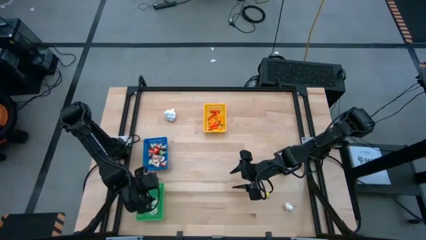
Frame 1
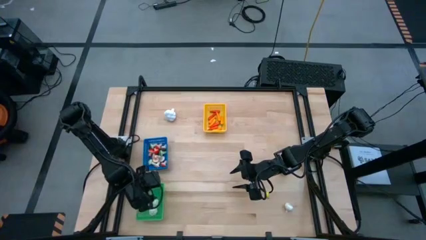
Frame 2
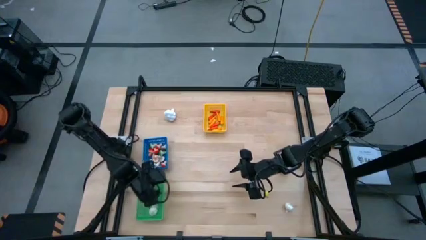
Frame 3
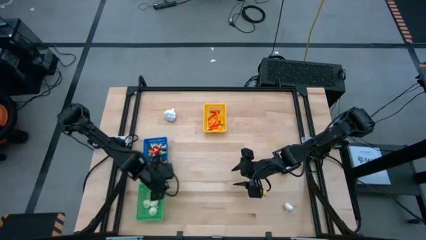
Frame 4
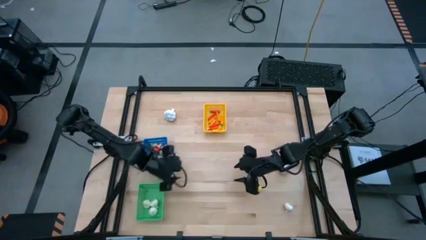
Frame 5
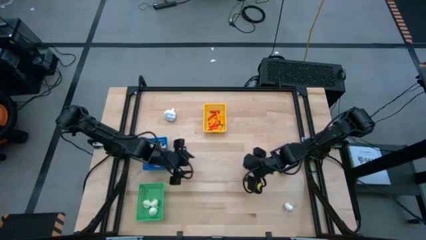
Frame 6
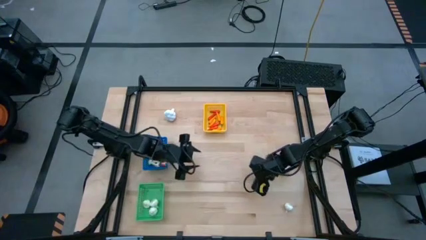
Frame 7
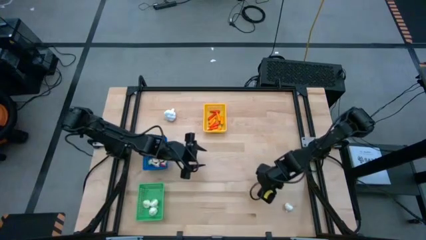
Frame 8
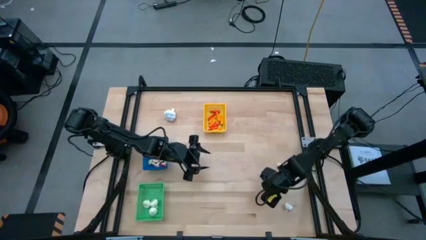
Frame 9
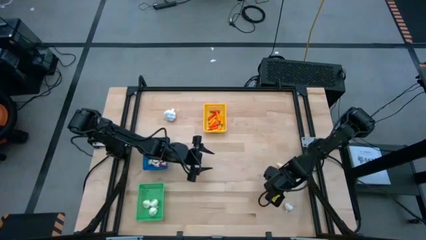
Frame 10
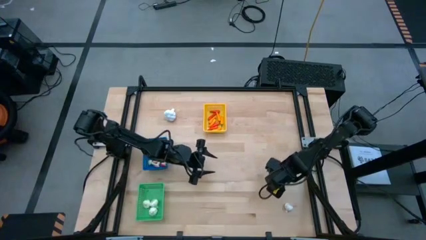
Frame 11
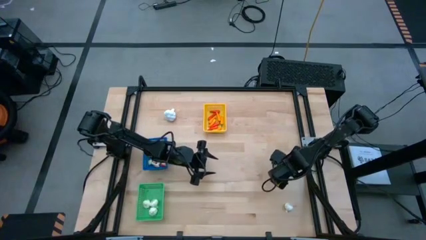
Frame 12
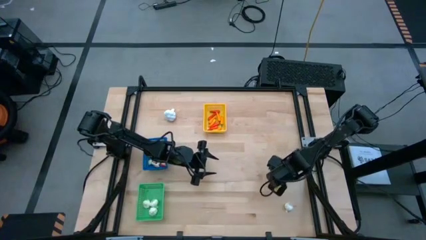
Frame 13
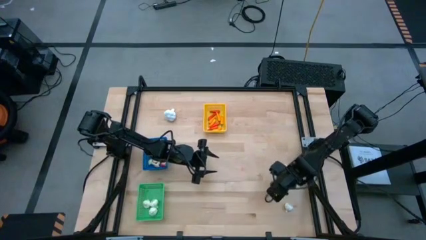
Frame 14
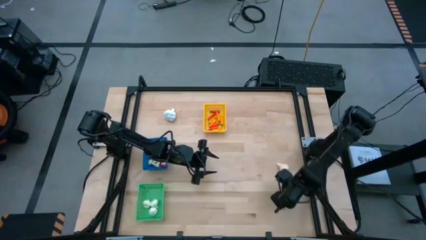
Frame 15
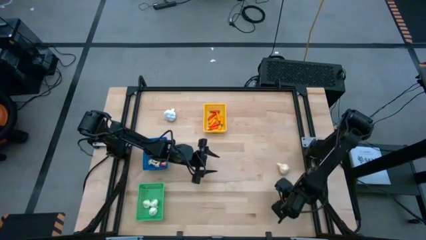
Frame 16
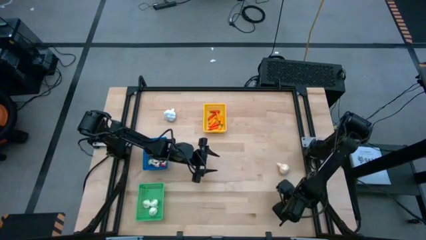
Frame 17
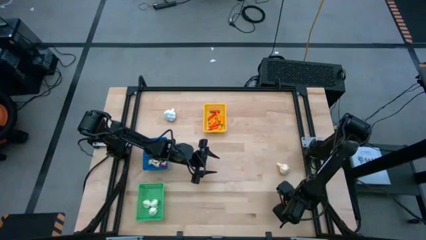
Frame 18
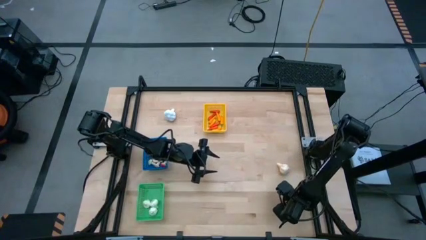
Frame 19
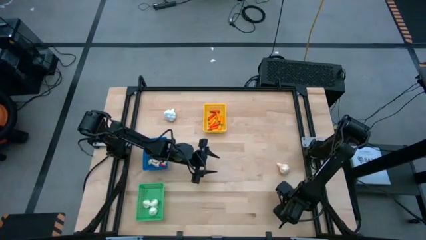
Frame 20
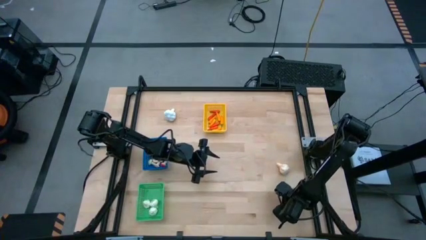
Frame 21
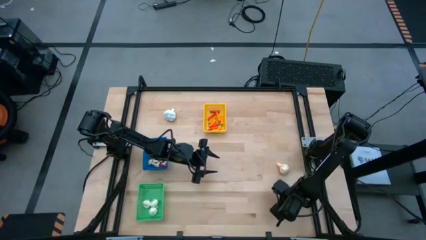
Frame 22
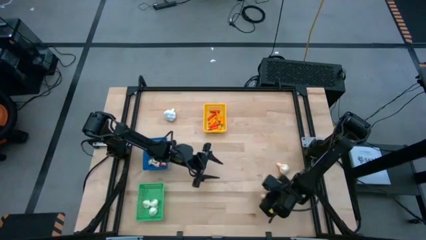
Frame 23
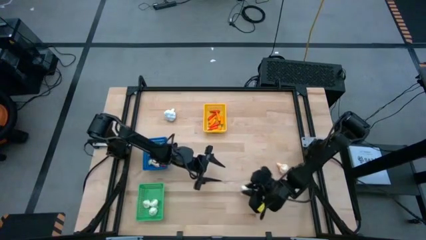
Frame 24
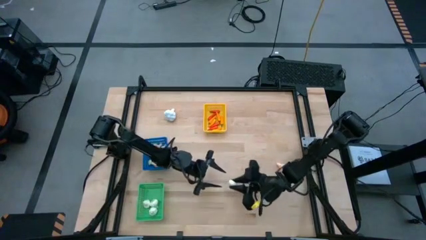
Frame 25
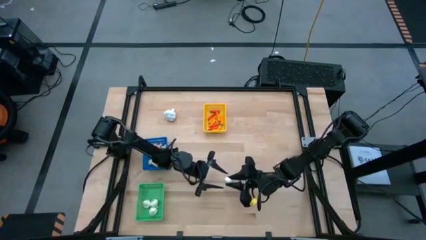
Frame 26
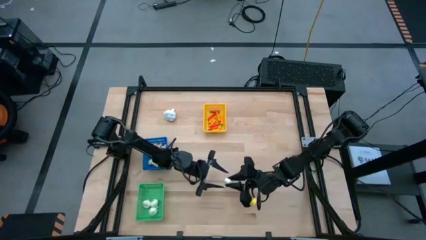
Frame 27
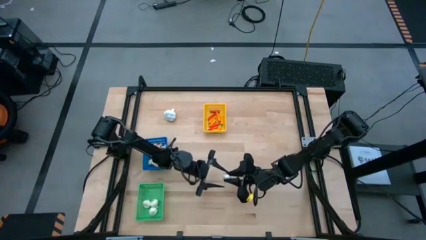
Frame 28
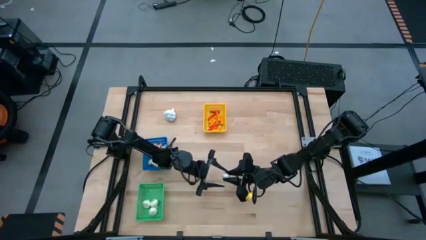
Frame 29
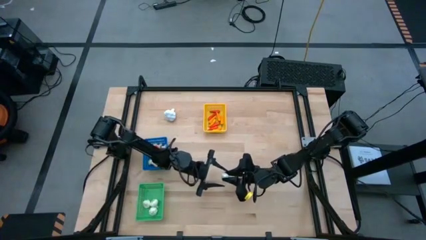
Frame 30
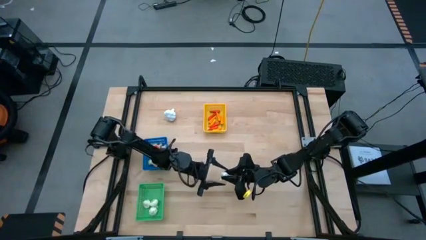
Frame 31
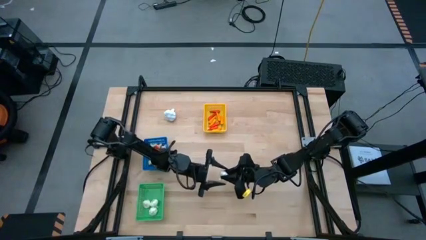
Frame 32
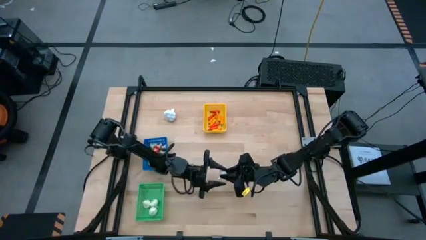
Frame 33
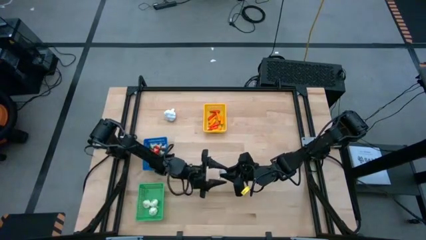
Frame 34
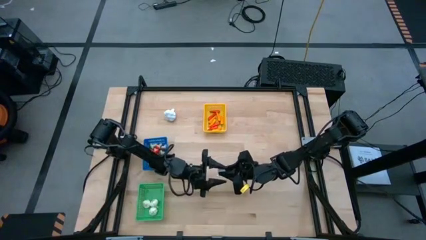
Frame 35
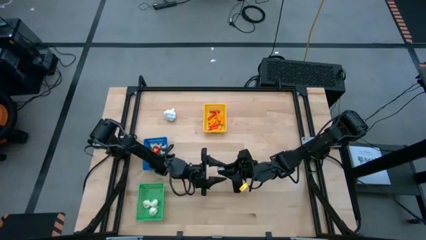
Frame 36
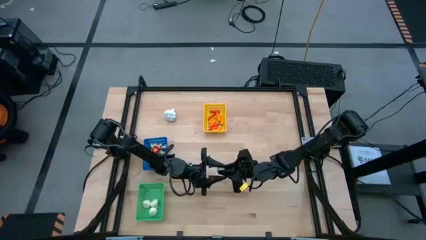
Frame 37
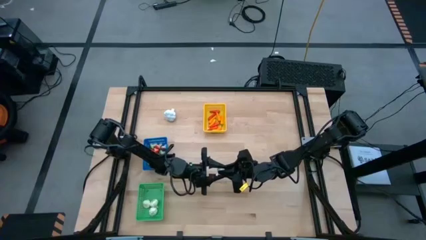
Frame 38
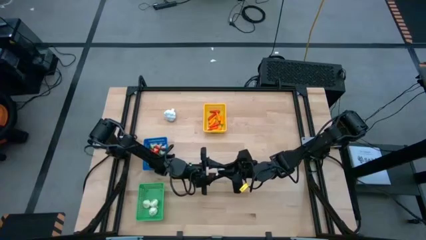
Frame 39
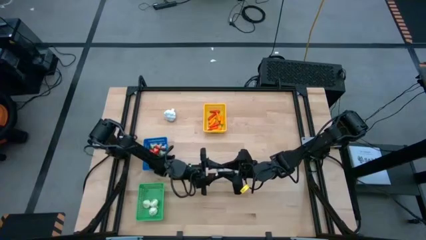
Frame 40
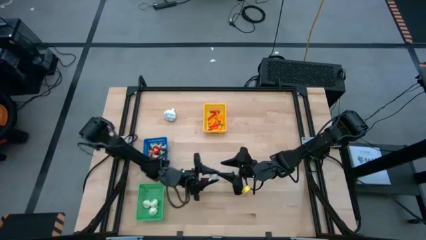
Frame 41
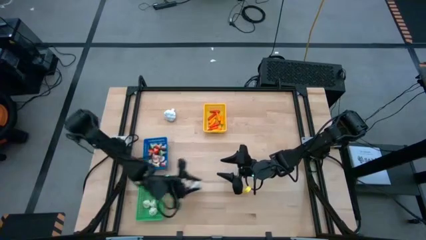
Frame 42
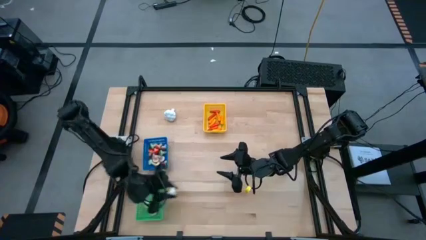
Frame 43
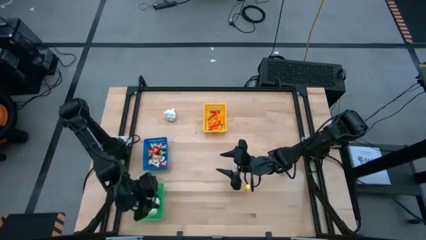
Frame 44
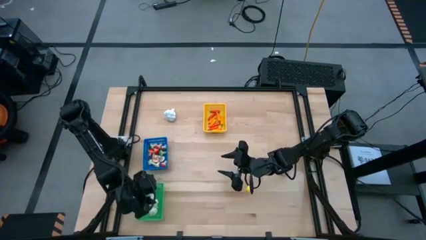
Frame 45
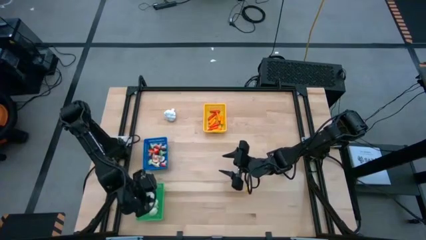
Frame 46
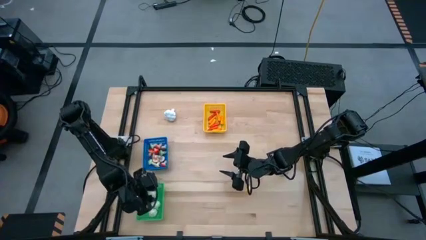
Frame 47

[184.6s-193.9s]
Task: Sort produce into baskets
Put the garlic into the green bin

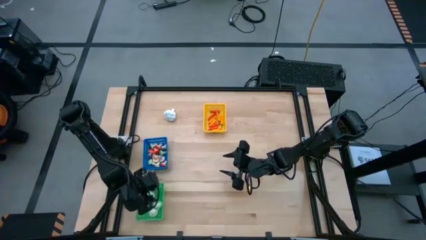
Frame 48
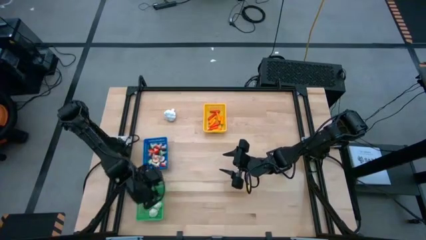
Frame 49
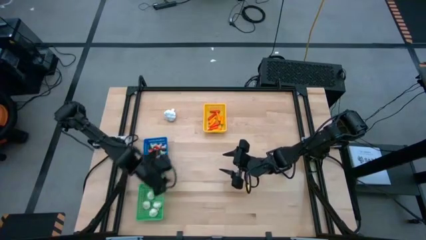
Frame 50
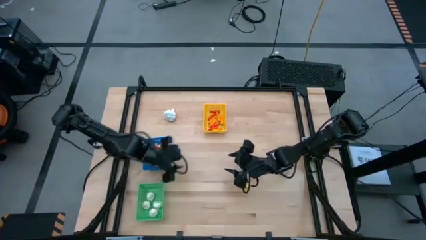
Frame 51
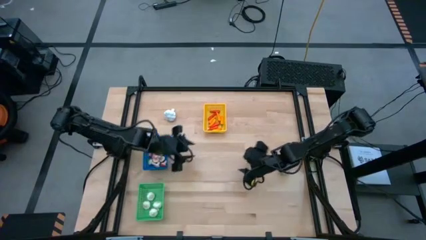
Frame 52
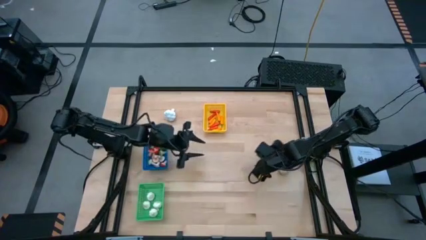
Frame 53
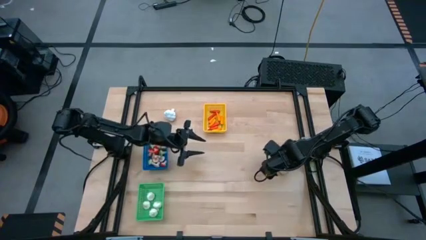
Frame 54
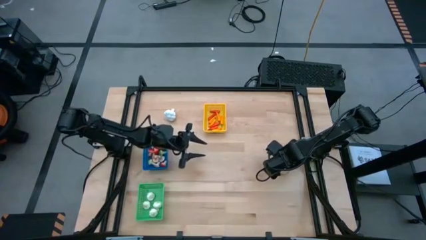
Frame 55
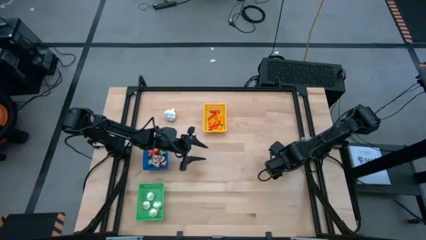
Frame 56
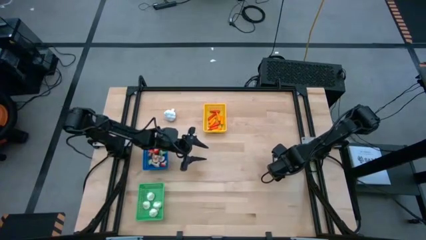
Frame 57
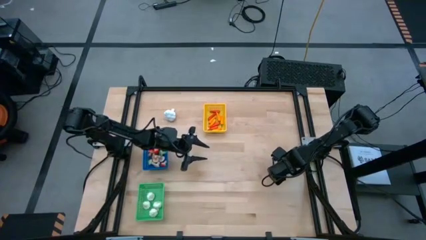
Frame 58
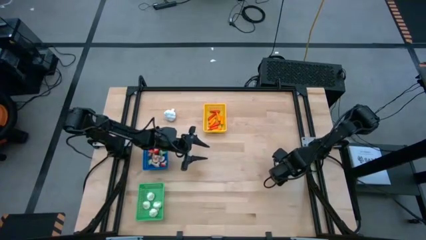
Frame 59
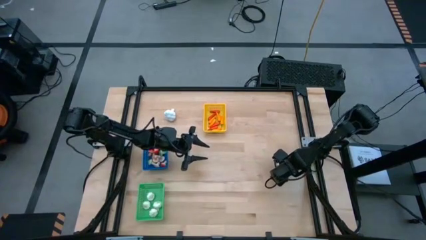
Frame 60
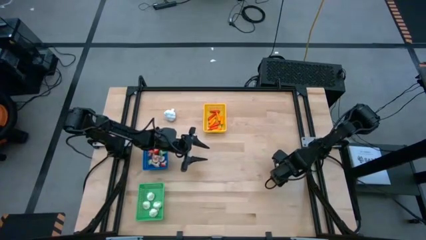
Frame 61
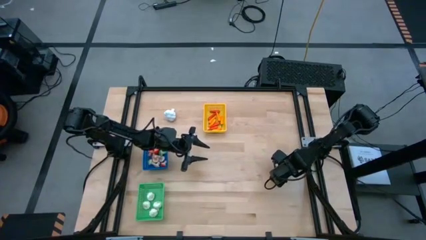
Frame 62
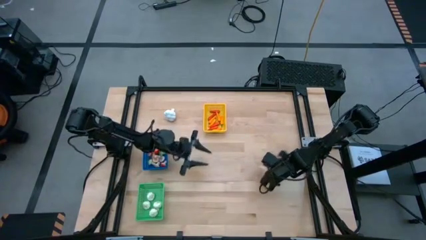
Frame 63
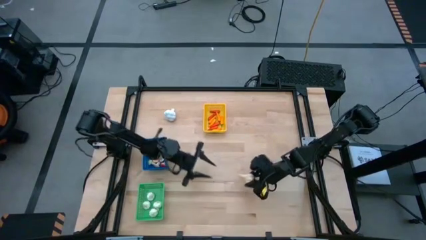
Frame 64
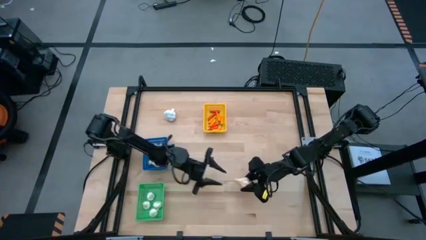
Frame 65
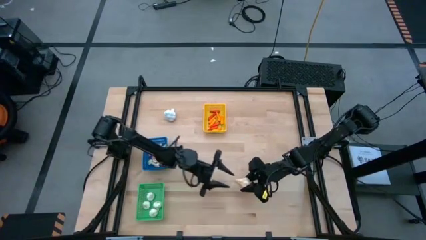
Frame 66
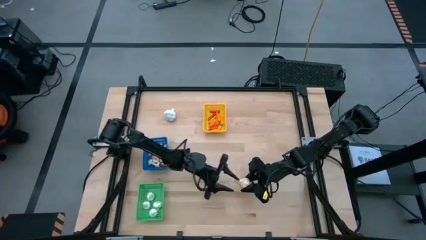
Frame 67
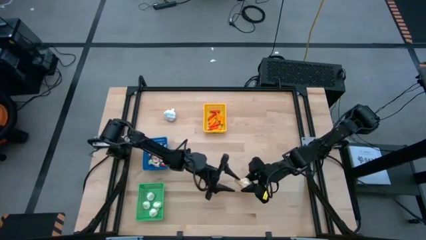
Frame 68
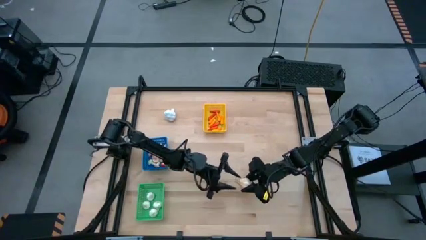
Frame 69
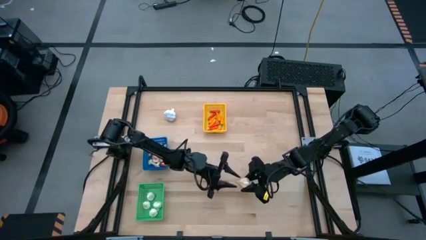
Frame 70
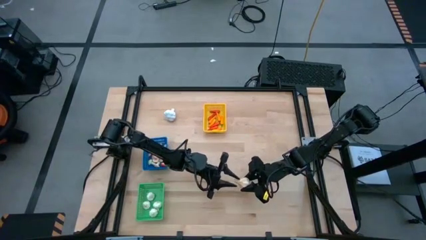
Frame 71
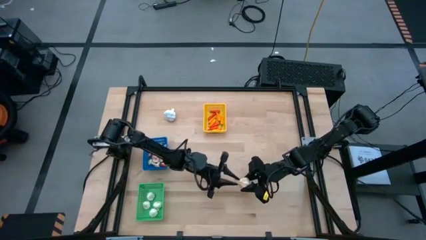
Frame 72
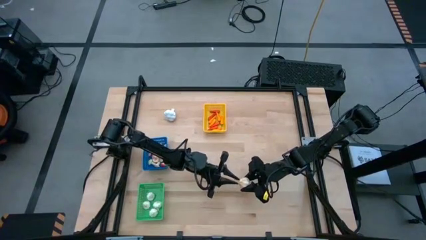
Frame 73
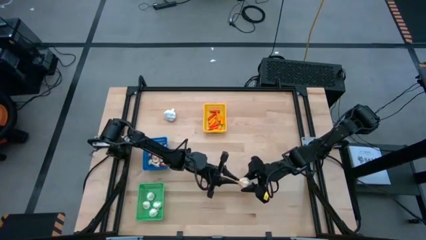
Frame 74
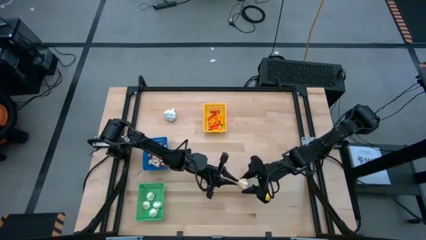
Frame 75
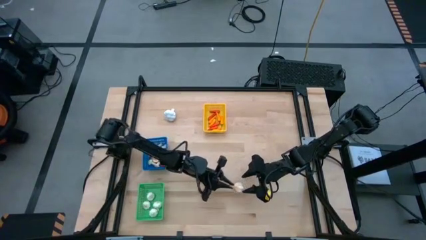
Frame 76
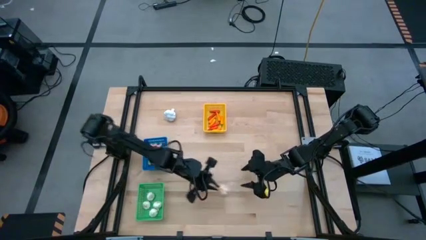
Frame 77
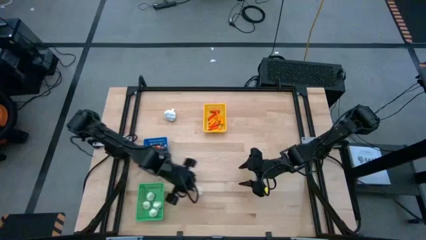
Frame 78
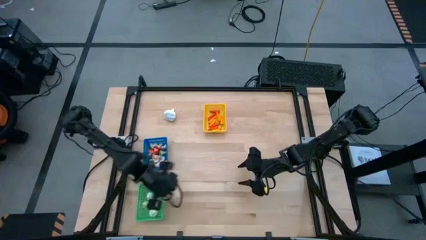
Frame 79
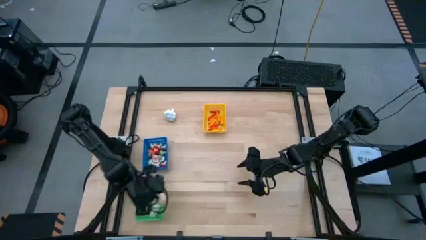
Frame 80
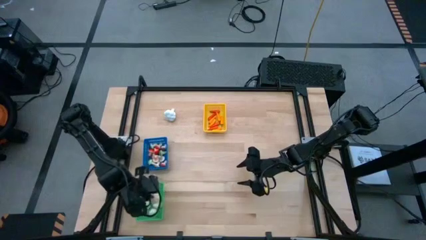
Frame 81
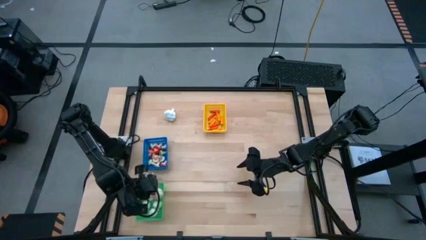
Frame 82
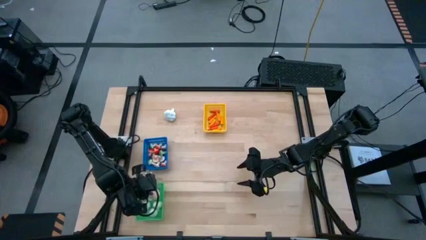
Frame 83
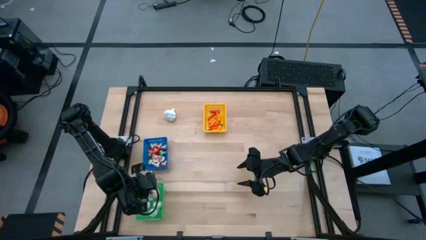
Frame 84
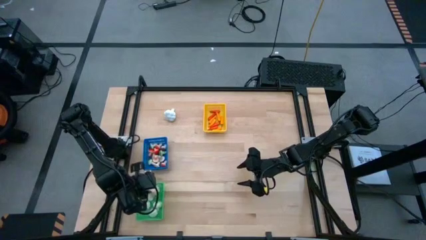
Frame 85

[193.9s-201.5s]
Put the garlic into the green bin
